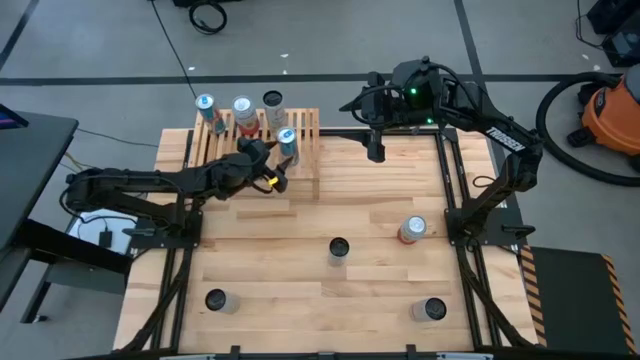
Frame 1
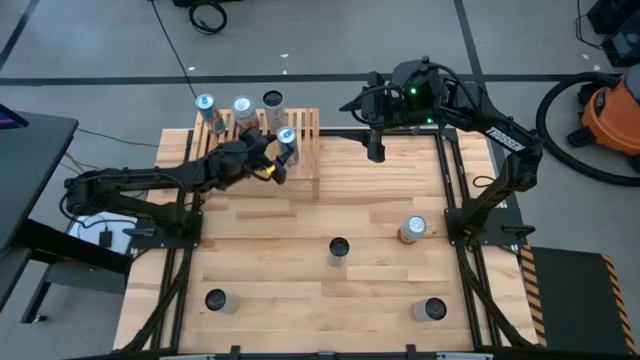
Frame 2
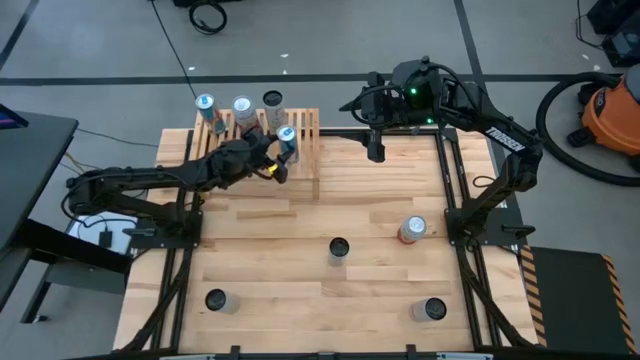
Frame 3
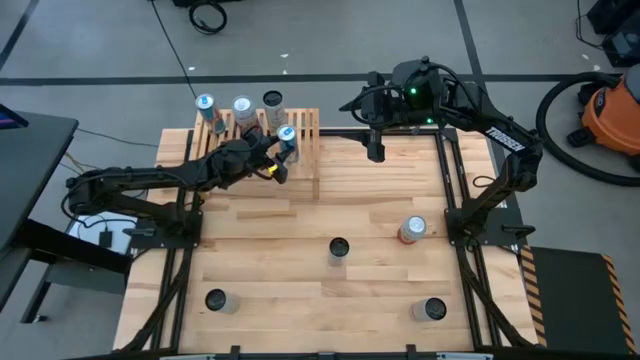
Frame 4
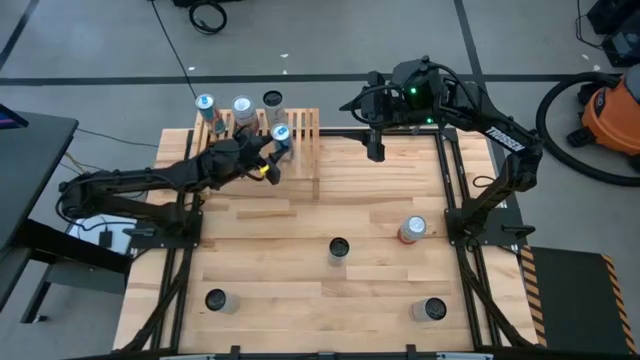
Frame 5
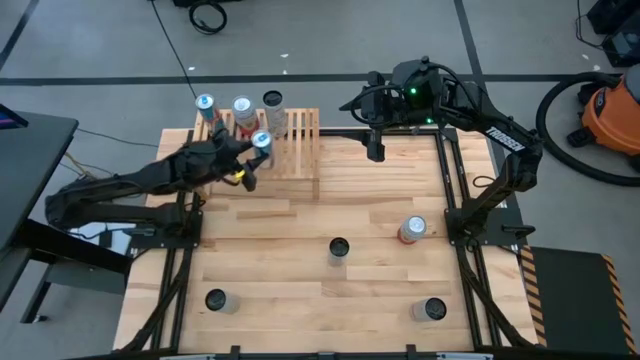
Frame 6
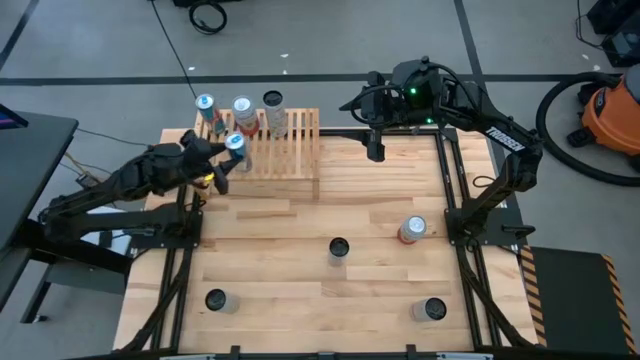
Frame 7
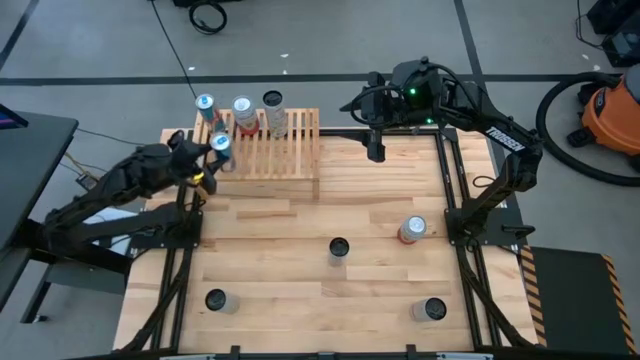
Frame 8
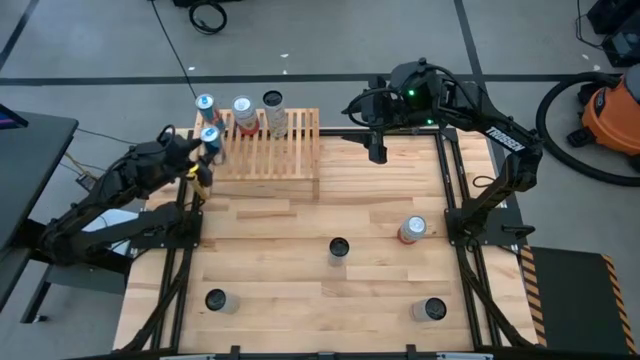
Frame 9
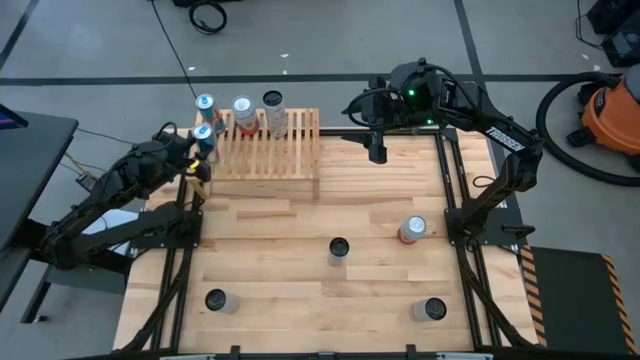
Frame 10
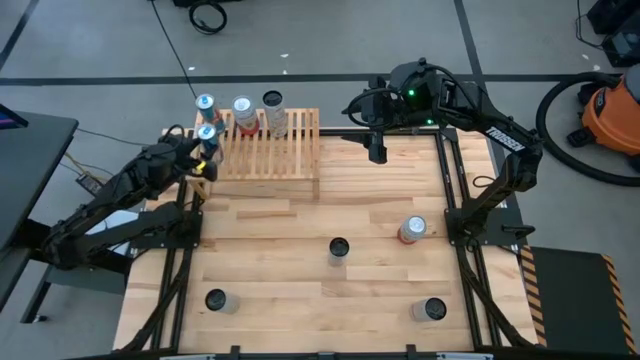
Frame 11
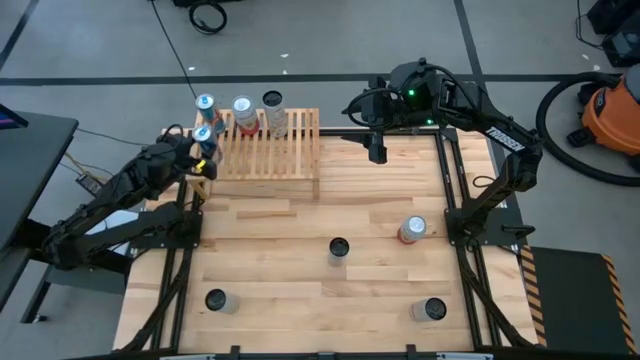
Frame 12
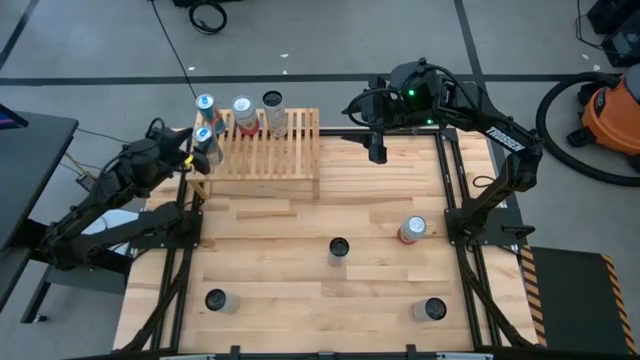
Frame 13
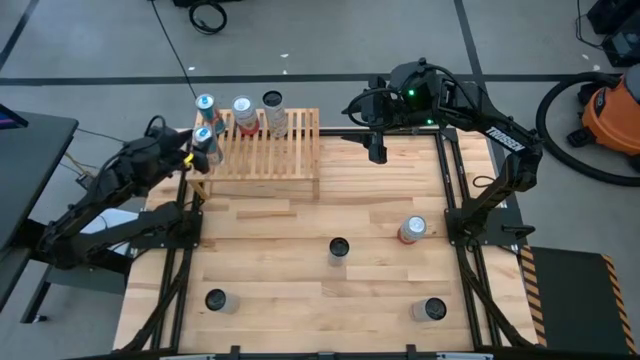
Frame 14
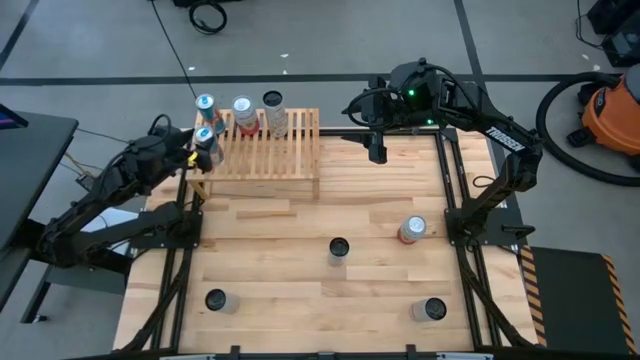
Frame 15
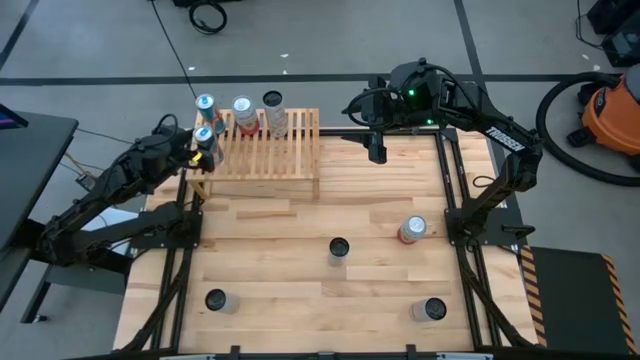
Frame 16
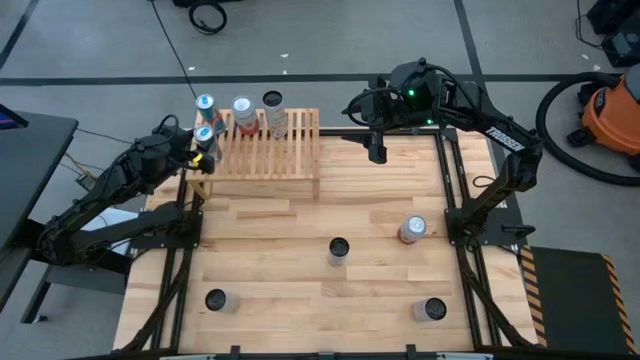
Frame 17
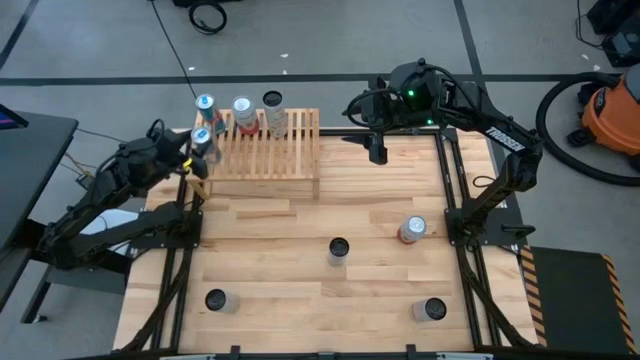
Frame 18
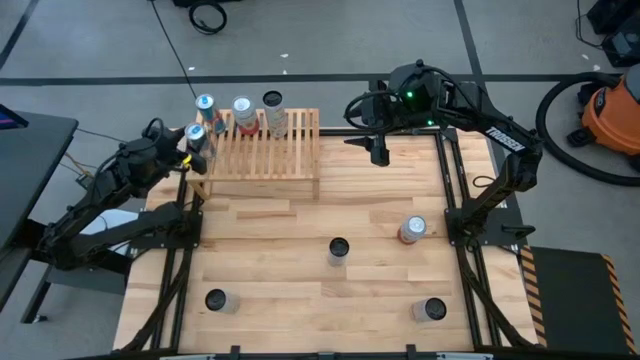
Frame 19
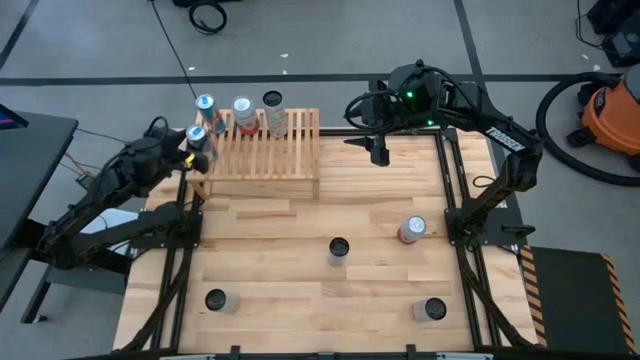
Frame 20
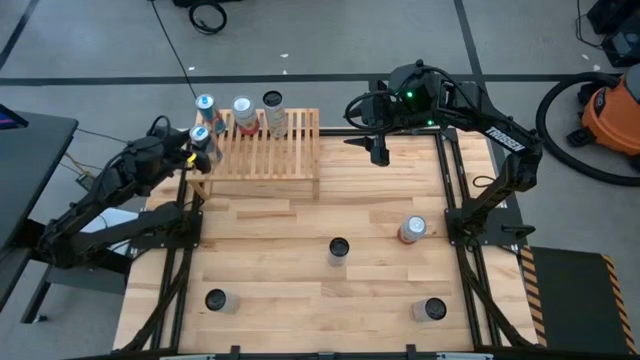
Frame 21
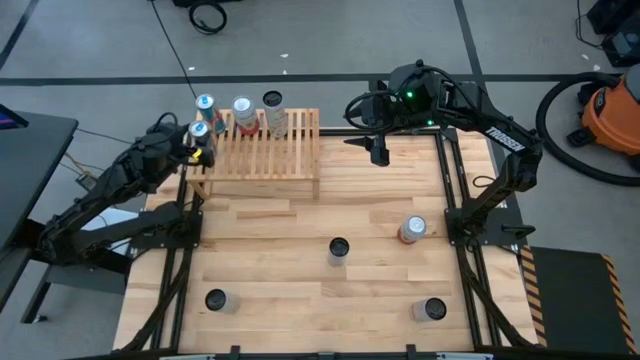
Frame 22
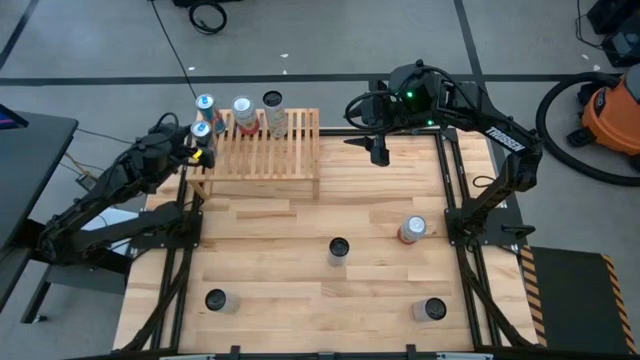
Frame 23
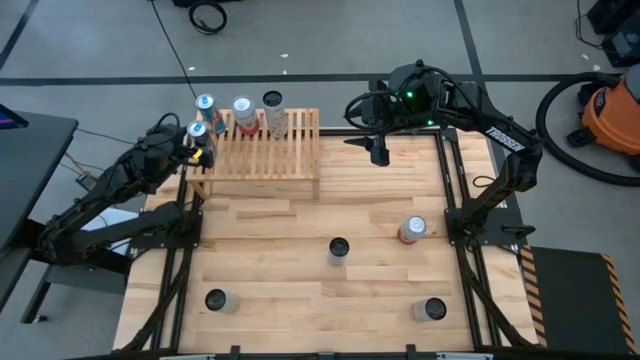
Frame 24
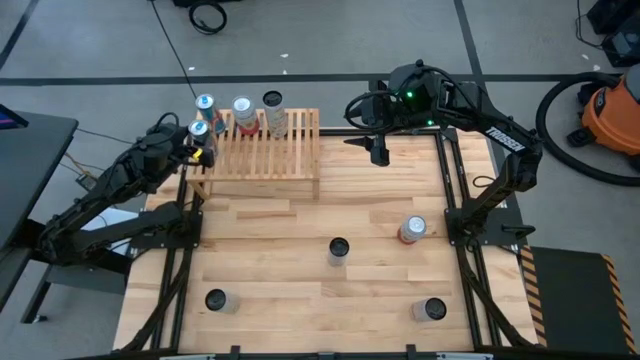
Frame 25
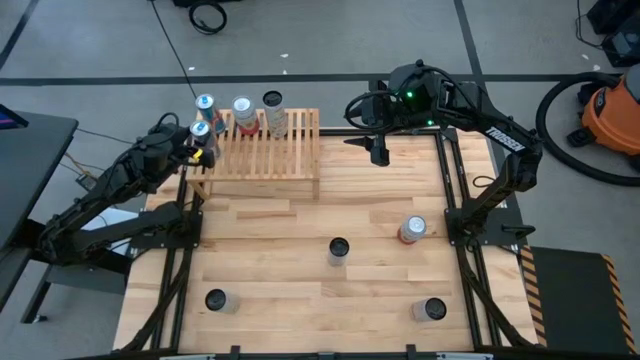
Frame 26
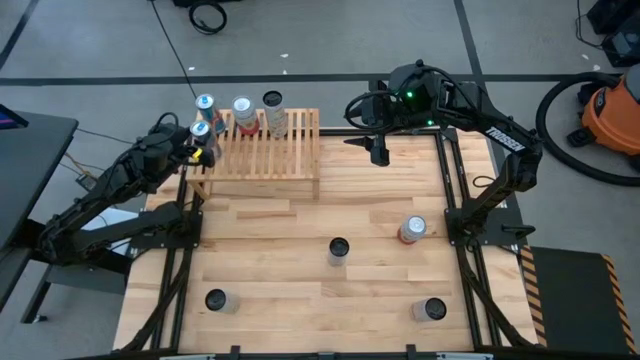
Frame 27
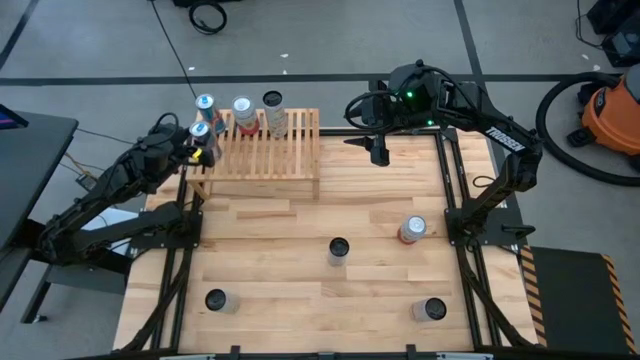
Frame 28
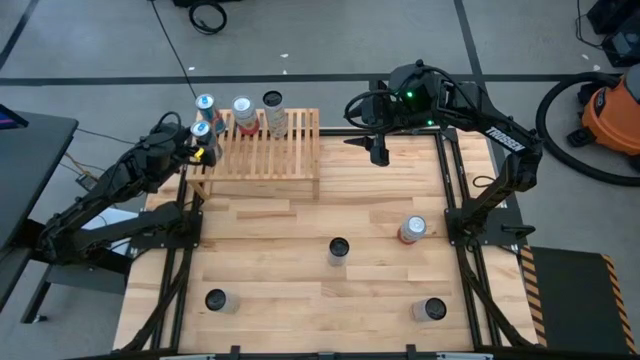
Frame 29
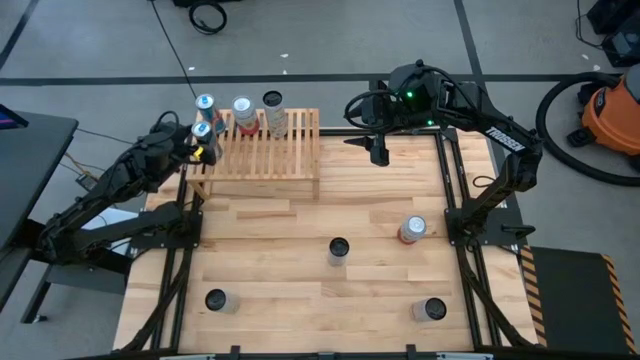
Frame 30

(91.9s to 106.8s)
Task: Place canned beverage on shelf
Put the blue soda can on the shelf aligned with the other blue soda can

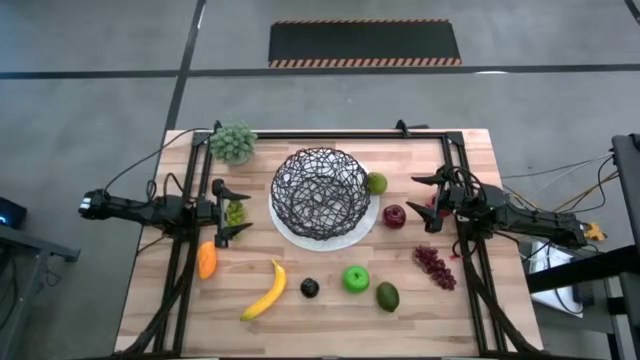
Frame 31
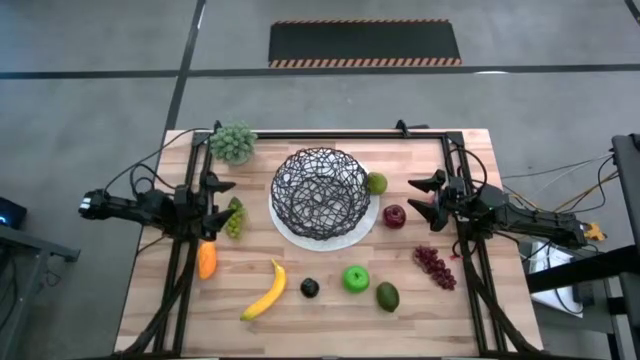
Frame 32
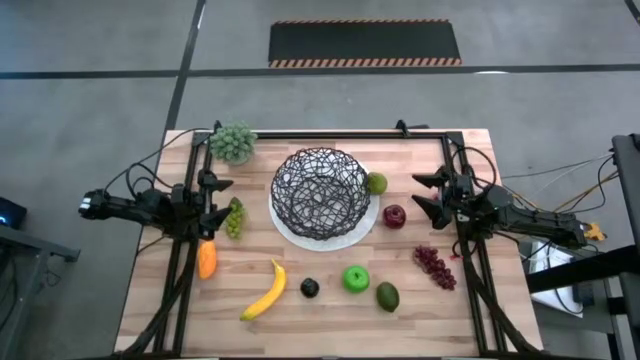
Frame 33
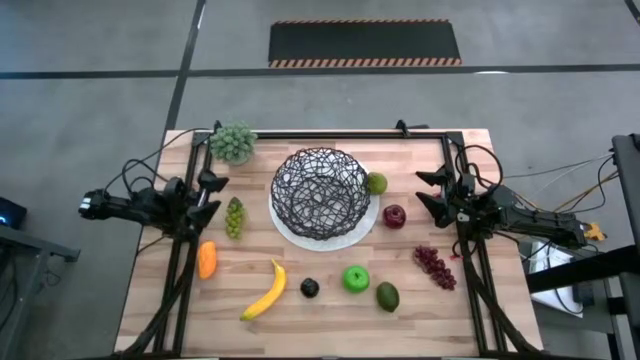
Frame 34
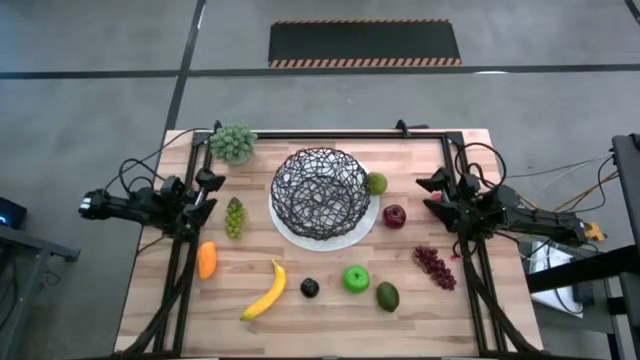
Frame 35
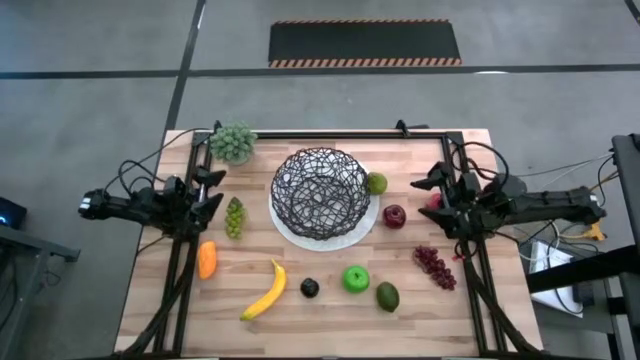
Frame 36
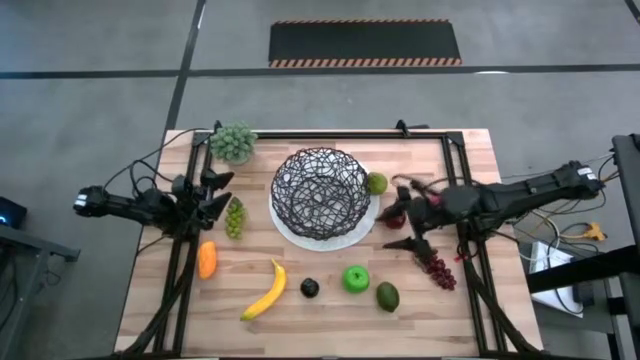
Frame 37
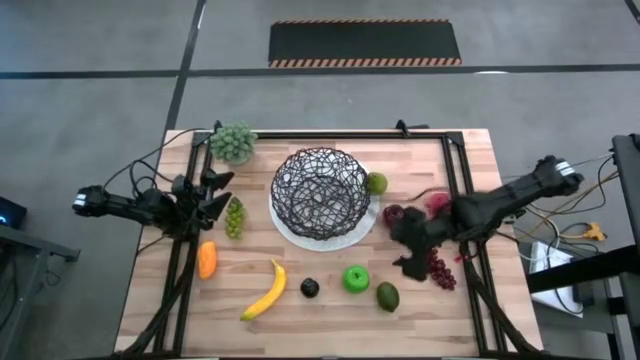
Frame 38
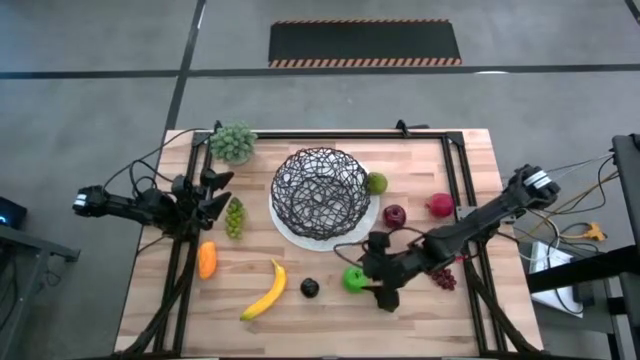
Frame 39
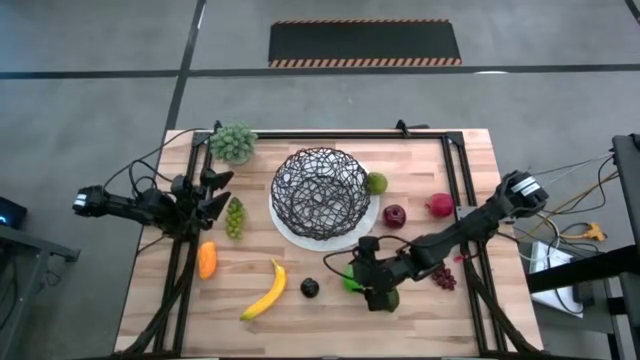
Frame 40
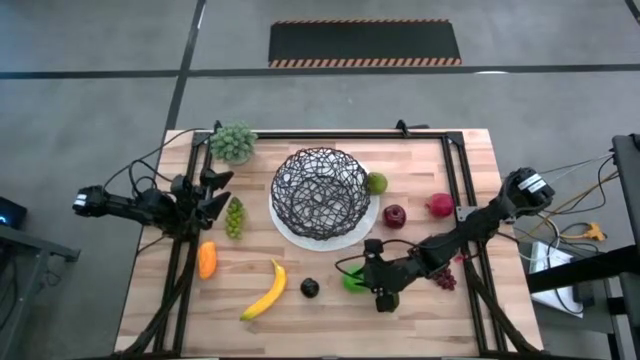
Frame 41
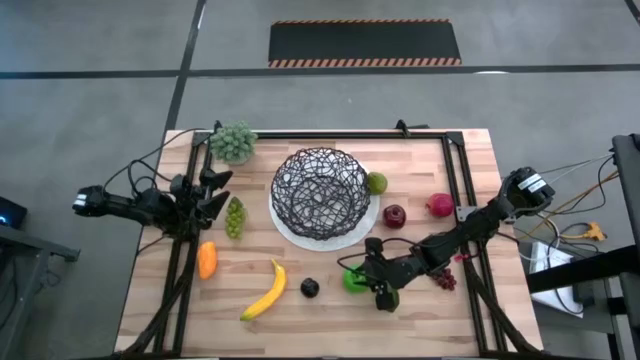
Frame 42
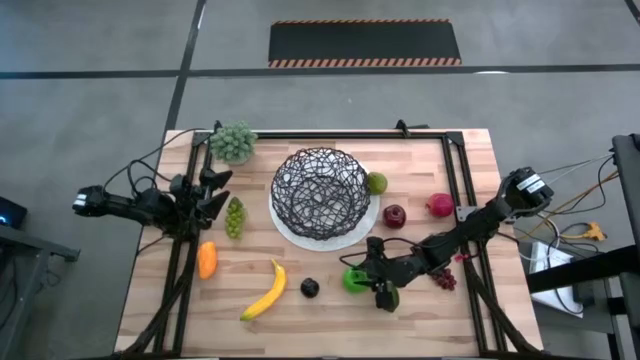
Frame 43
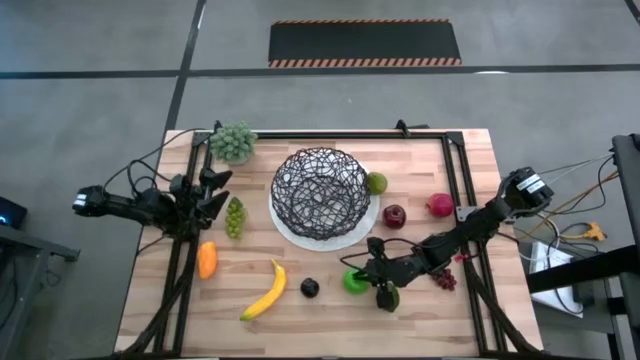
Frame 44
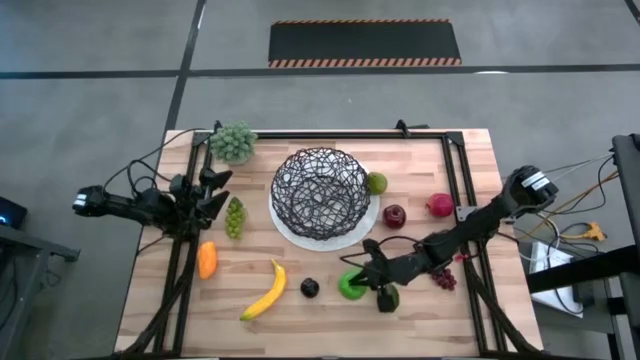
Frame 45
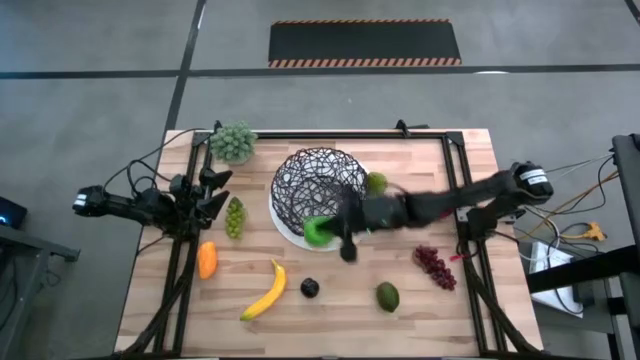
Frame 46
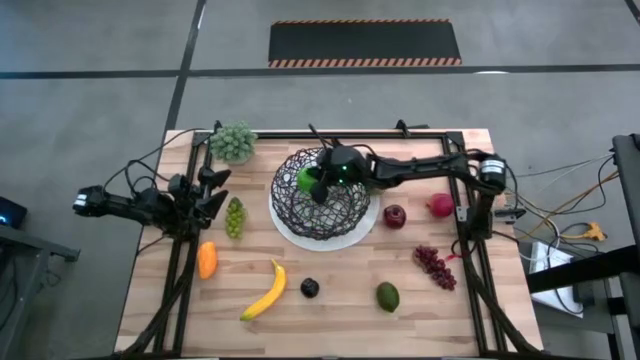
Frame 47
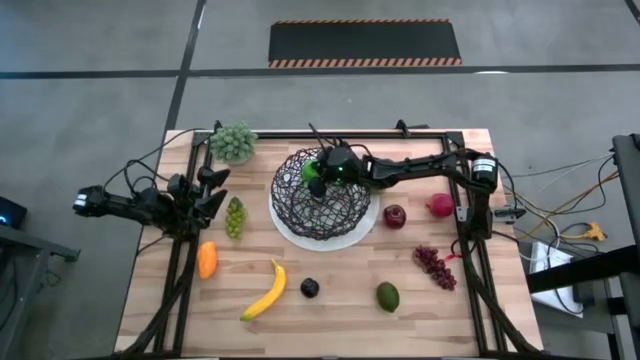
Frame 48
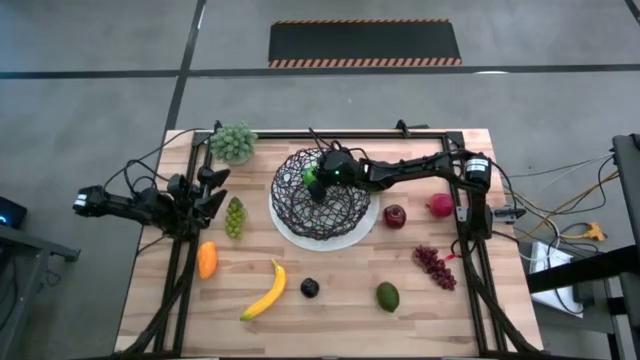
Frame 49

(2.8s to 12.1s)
Task: Build produce basket
Put the green apple into the wire basket
